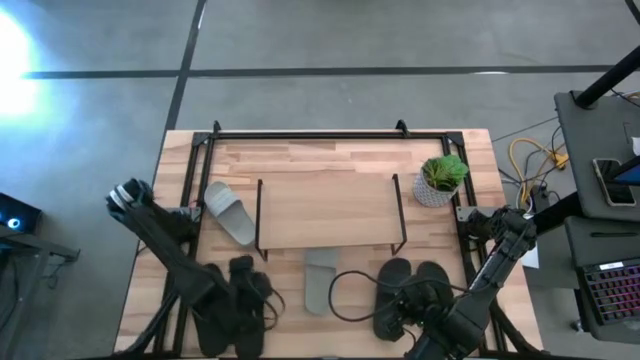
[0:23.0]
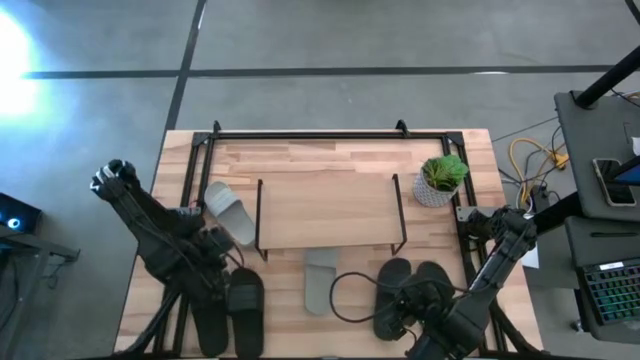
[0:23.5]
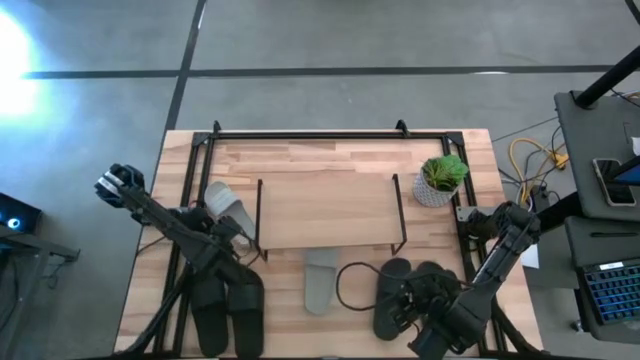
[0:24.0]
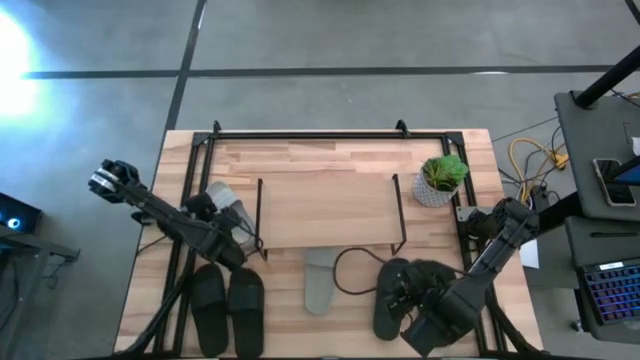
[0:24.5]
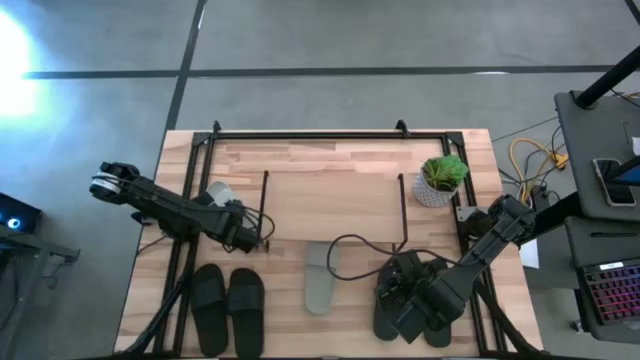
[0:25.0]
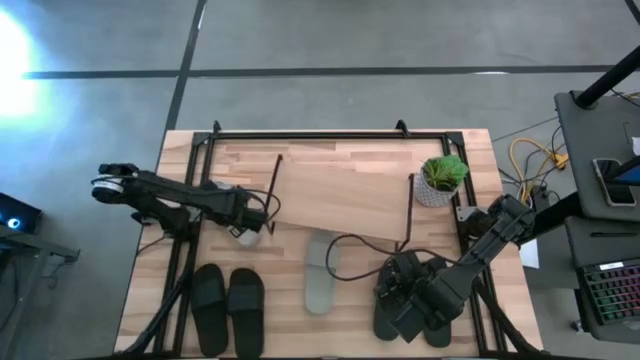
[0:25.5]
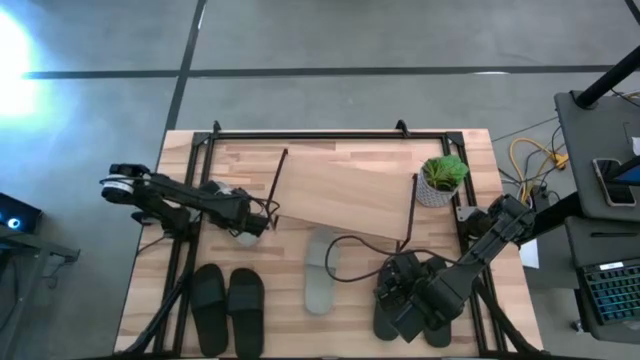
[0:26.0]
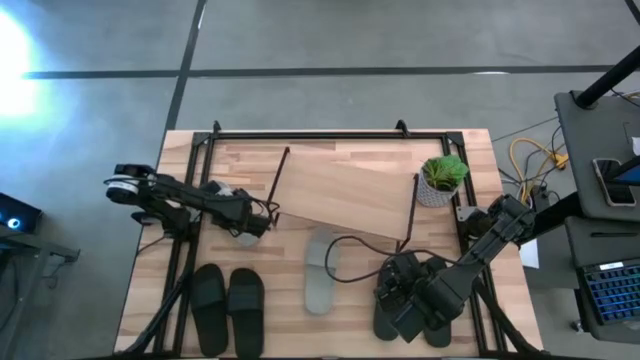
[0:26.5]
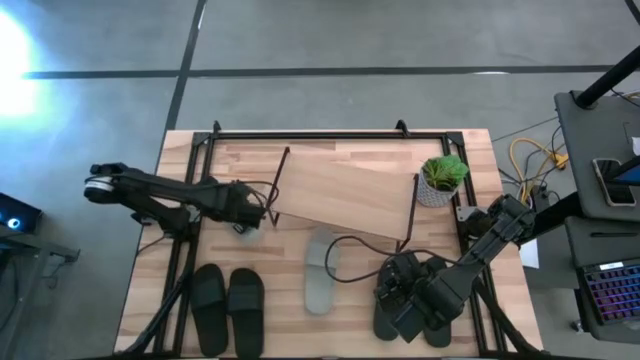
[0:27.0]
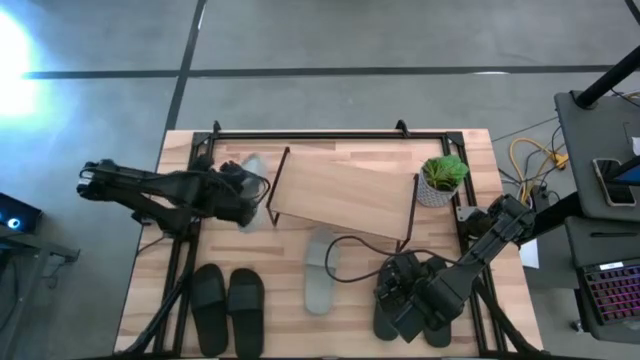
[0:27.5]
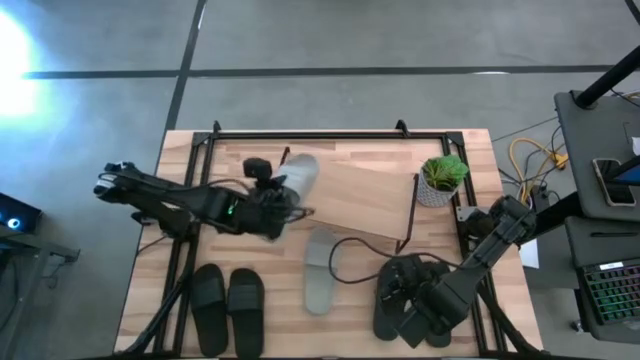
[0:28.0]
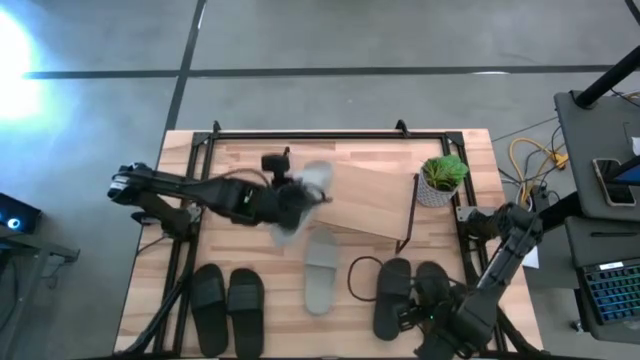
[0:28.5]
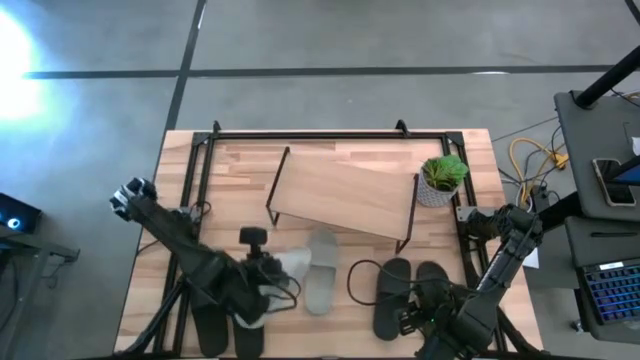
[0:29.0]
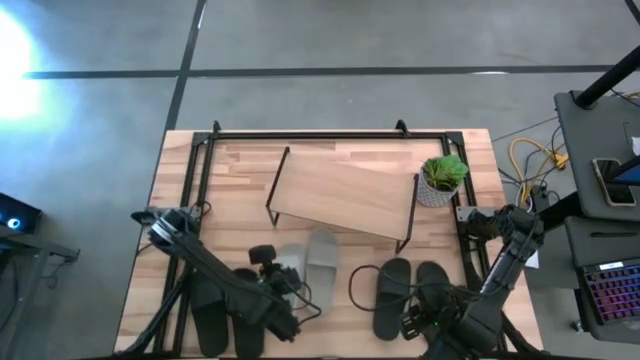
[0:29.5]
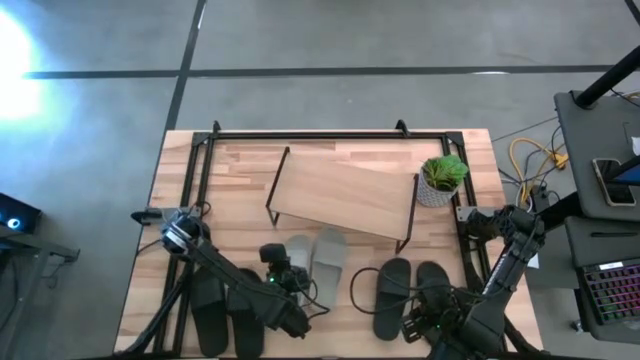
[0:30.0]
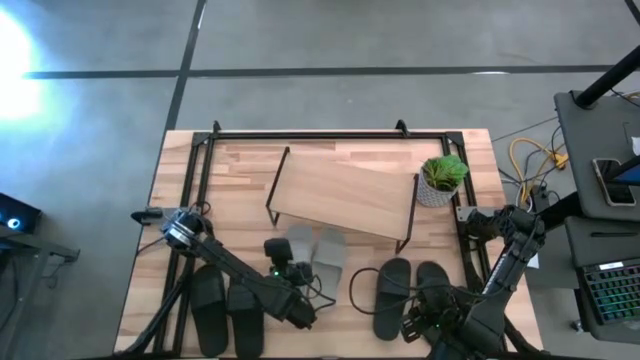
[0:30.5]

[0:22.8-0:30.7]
Task: Pick and place slides into the shelf
Move the gray slide under the shelf

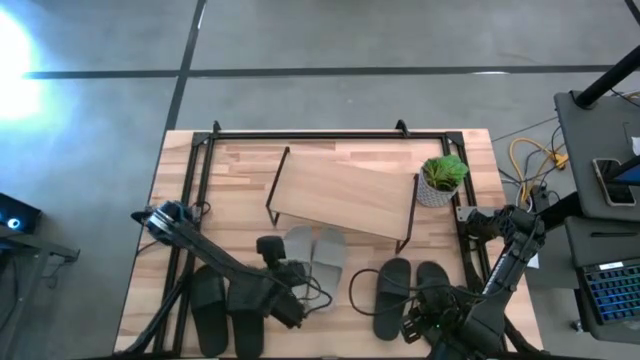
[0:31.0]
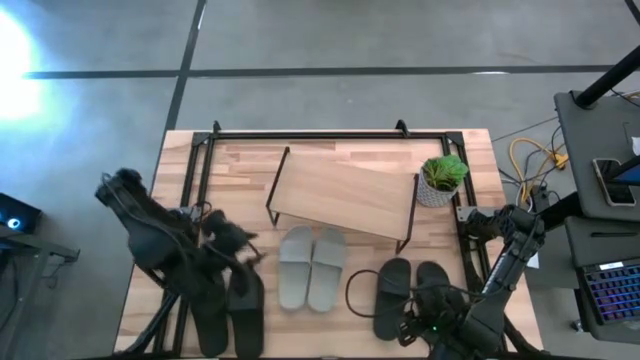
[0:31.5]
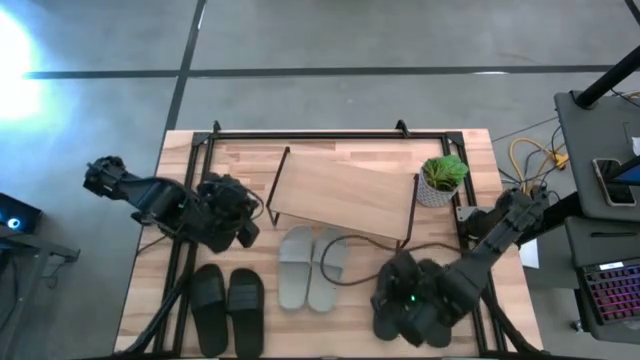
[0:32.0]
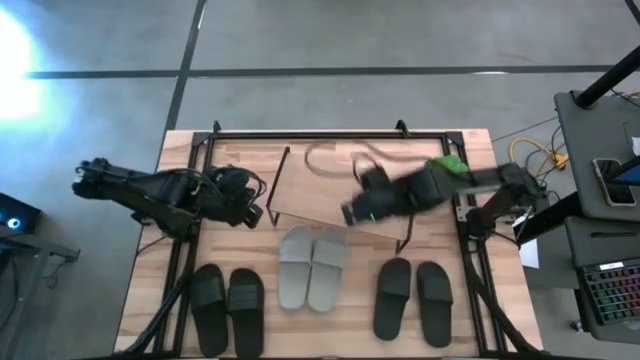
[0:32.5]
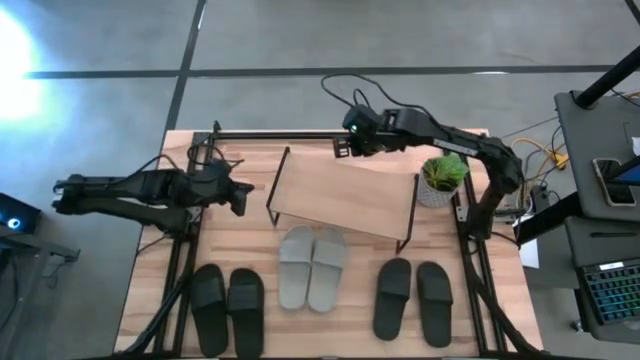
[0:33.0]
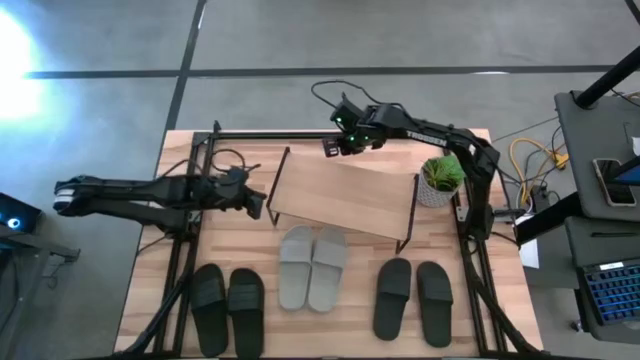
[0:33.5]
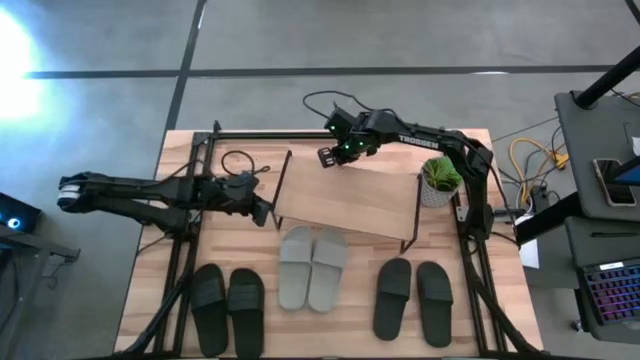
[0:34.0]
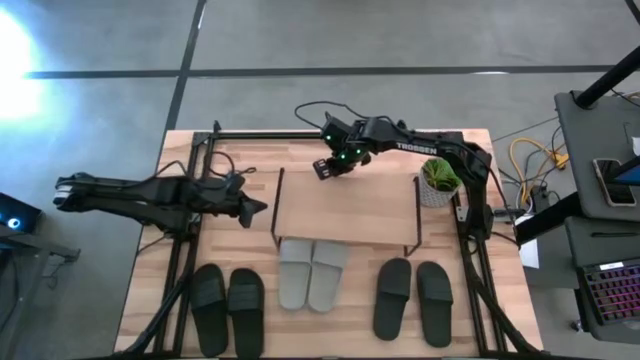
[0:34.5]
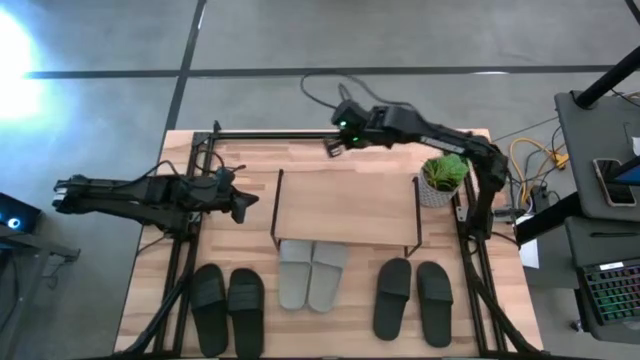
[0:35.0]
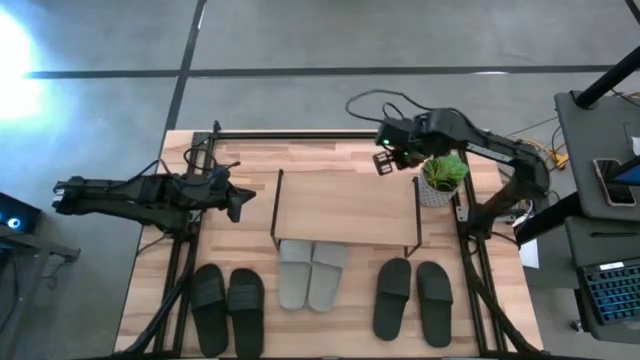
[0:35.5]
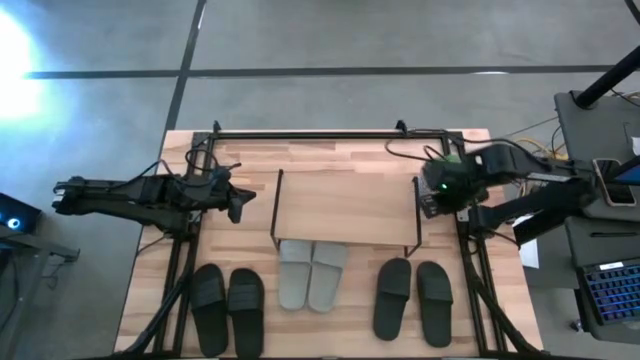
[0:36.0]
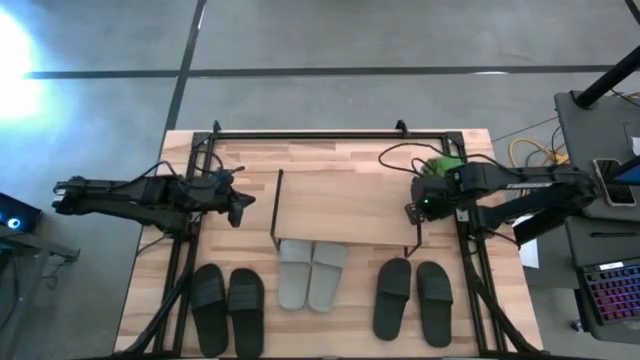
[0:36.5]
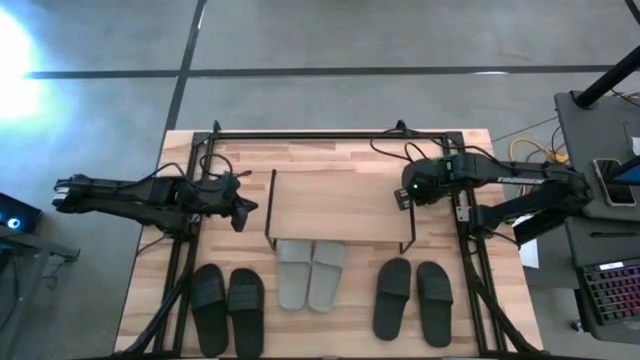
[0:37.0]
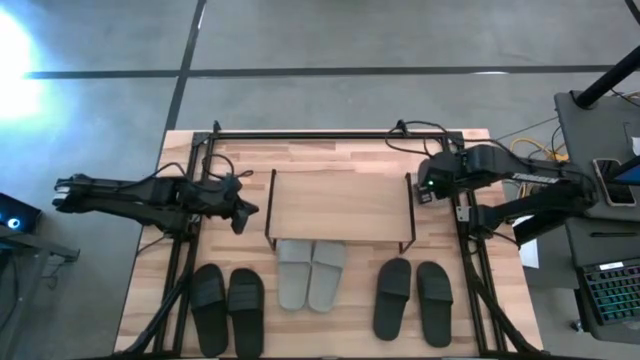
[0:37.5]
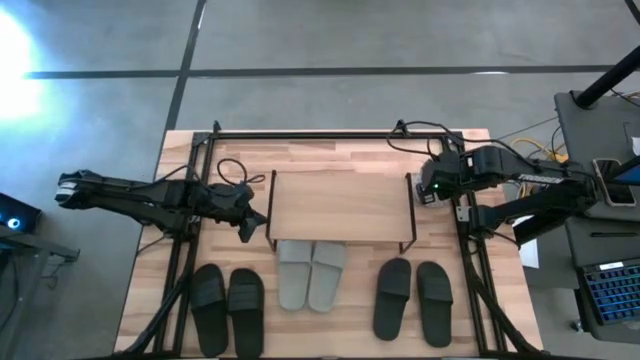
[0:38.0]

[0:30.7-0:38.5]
Adjust the shelf on the table

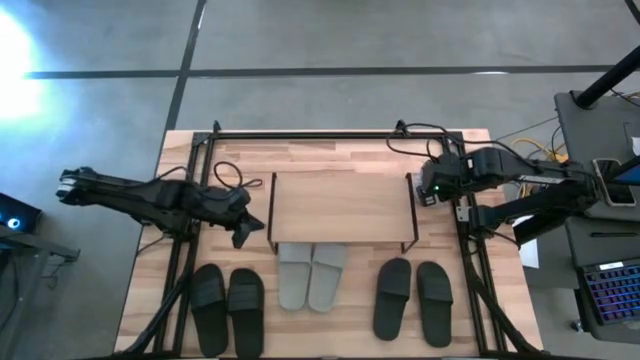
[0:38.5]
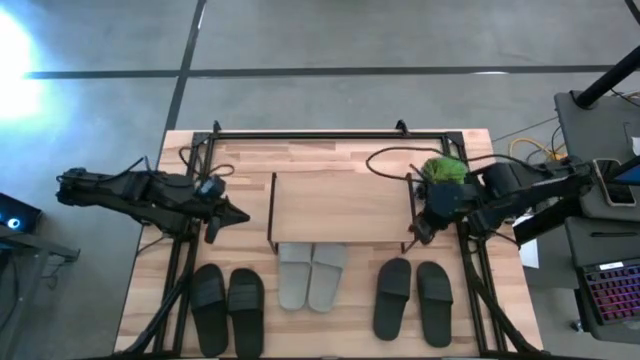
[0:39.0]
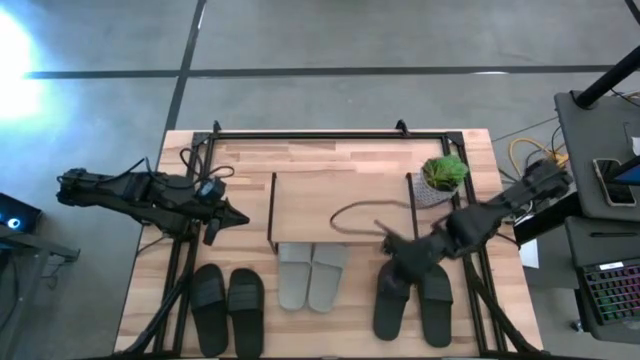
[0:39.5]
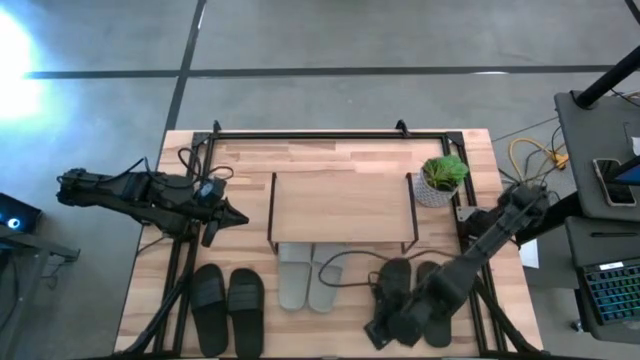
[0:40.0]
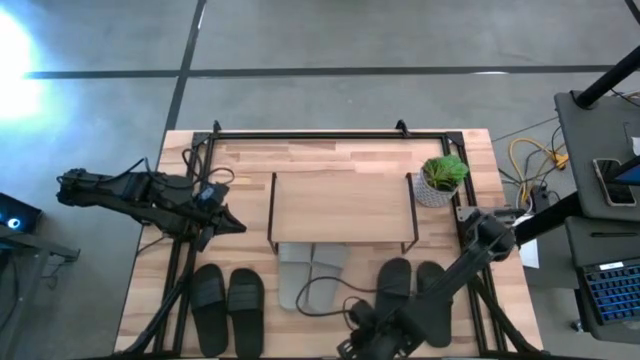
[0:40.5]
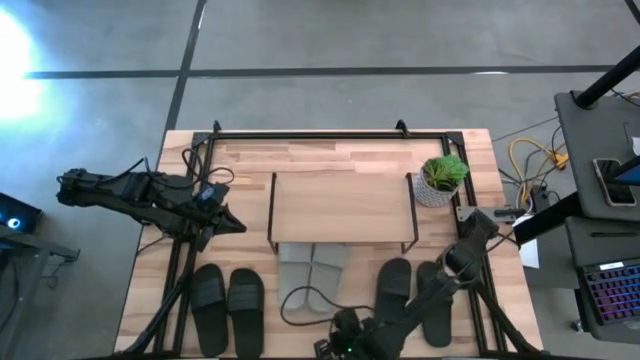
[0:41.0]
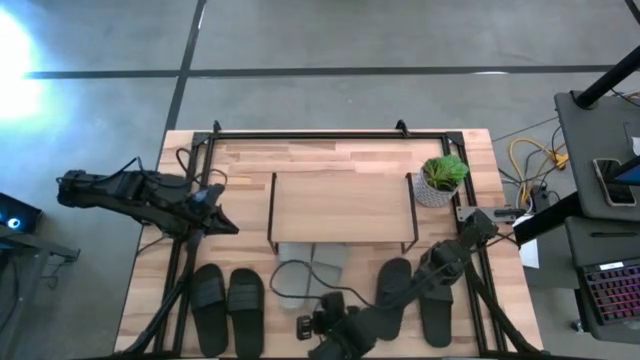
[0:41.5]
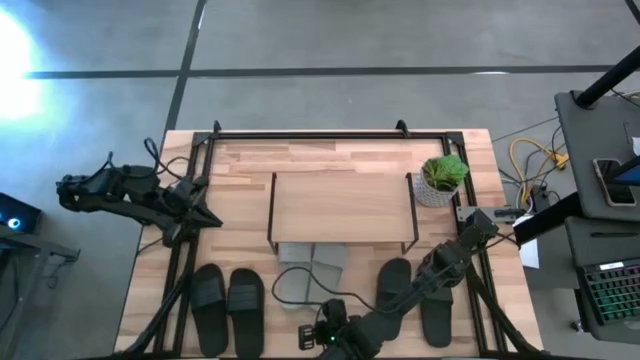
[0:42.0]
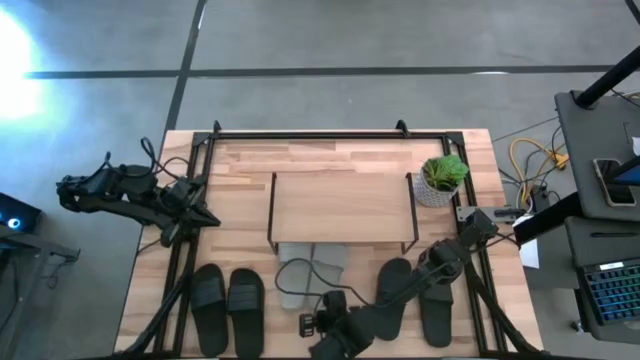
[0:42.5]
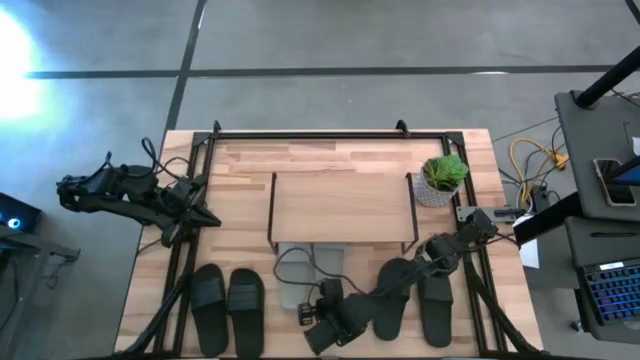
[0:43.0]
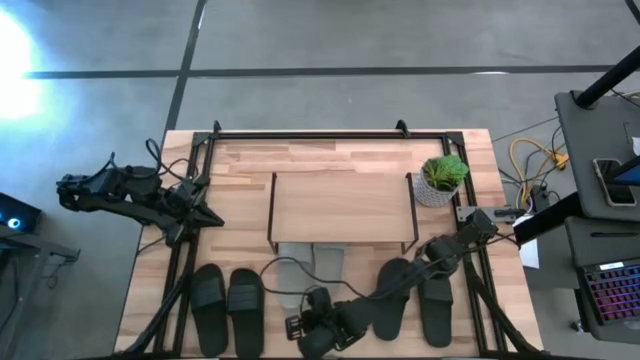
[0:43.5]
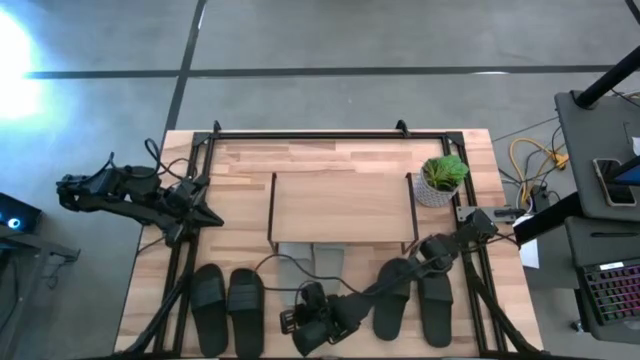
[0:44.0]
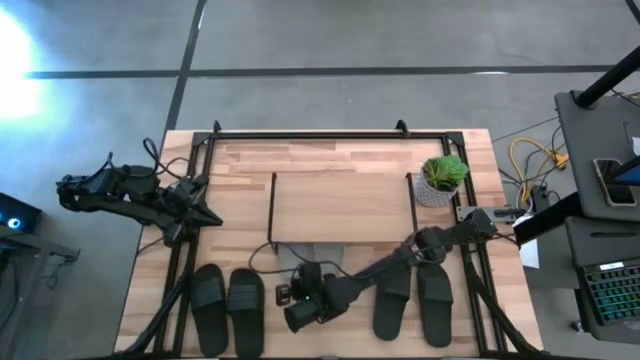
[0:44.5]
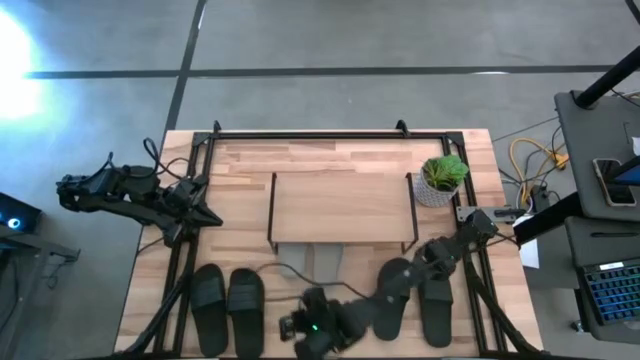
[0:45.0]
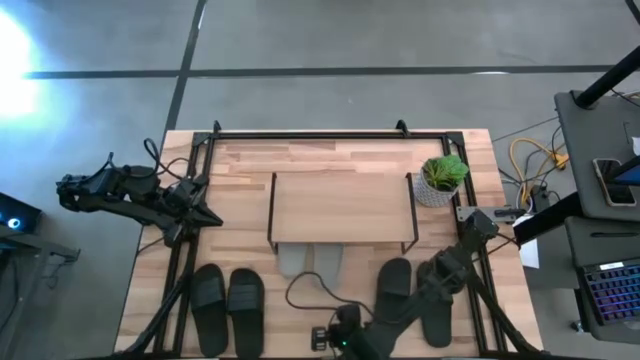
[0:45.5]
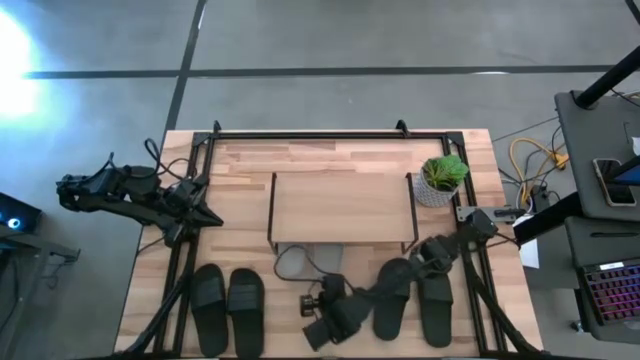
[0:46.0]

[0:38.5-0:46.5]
Move the gray slides under the shelf
